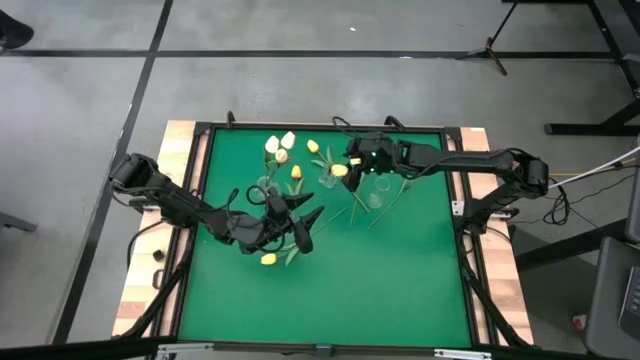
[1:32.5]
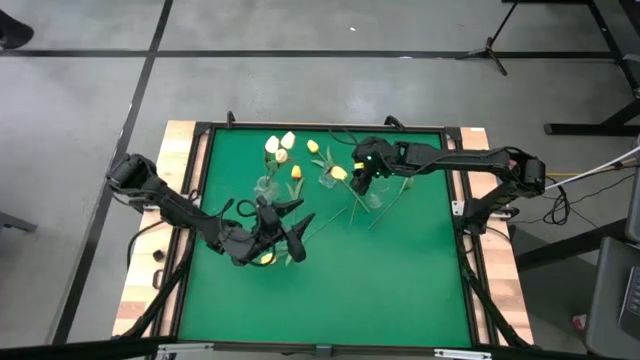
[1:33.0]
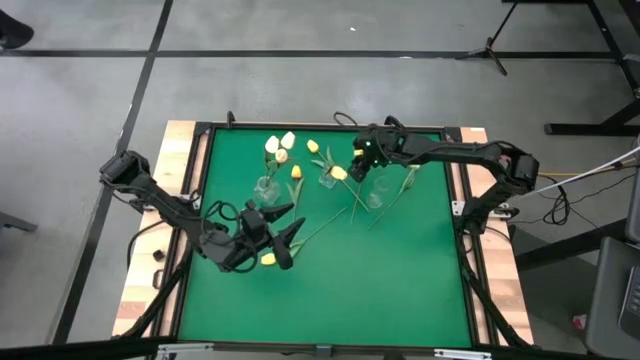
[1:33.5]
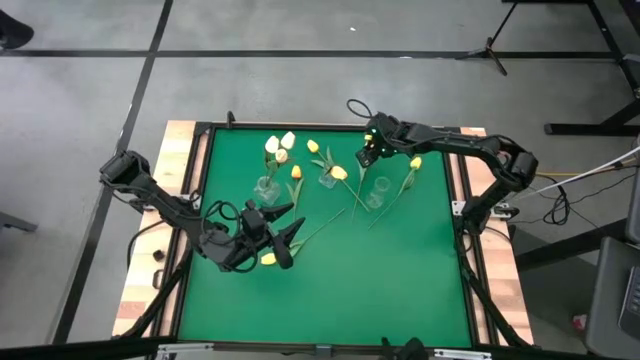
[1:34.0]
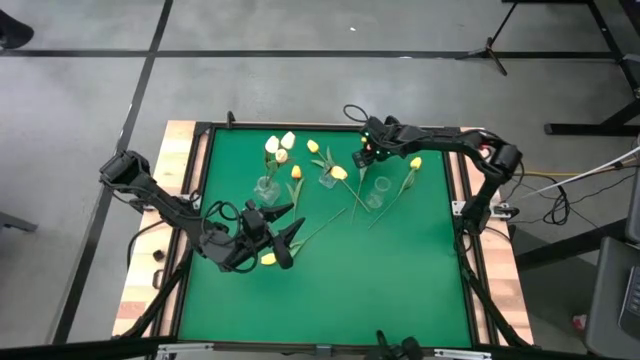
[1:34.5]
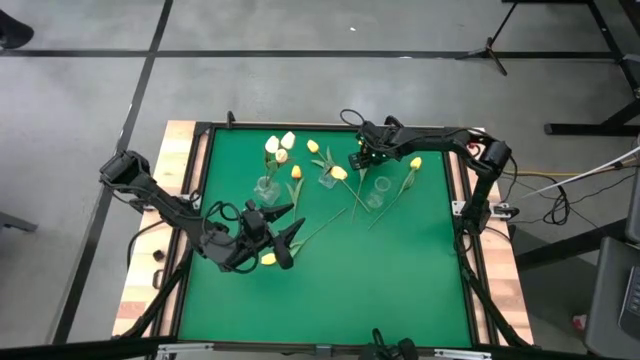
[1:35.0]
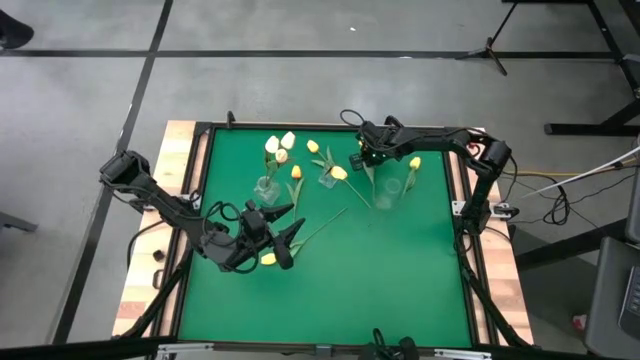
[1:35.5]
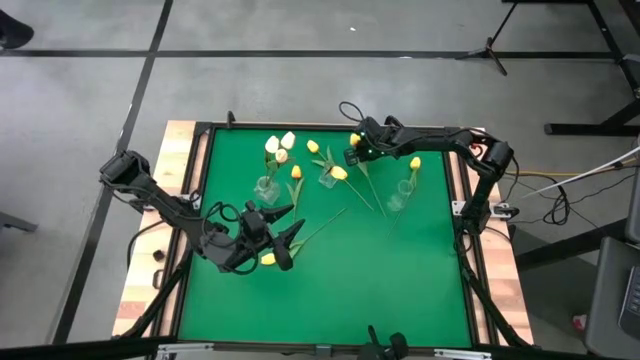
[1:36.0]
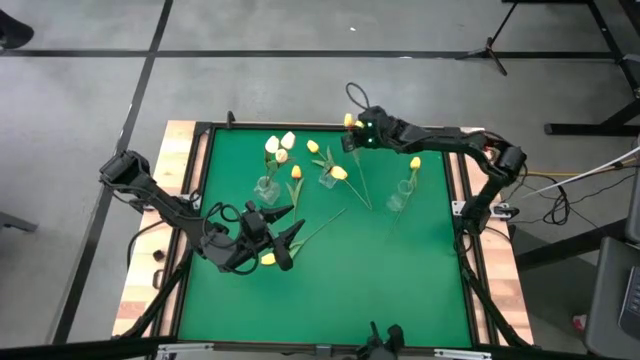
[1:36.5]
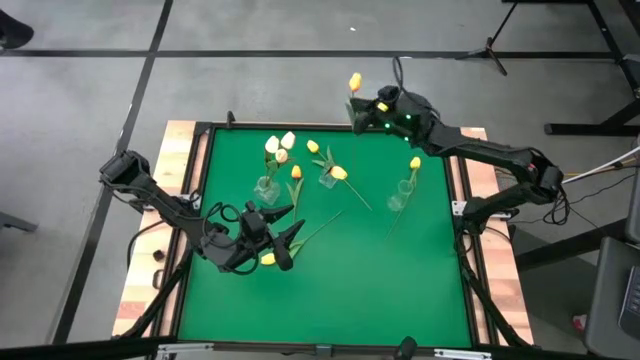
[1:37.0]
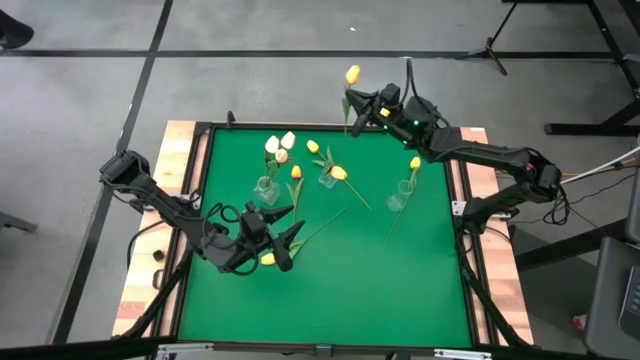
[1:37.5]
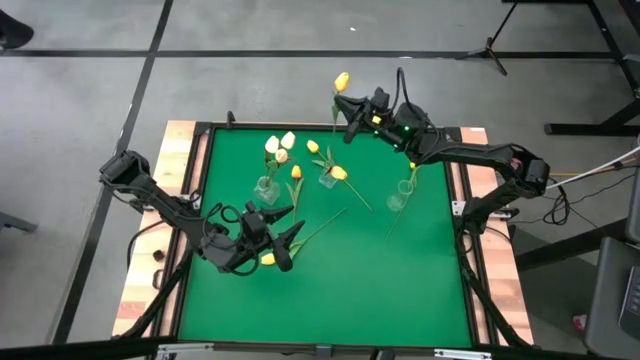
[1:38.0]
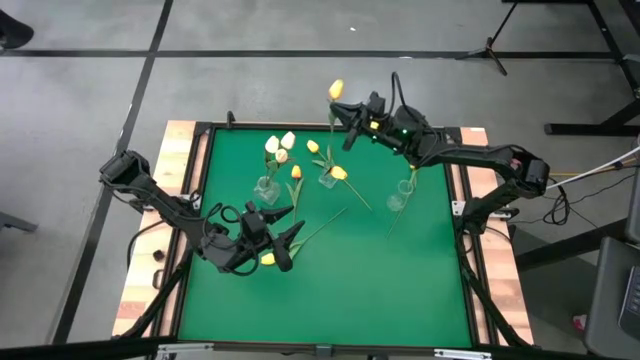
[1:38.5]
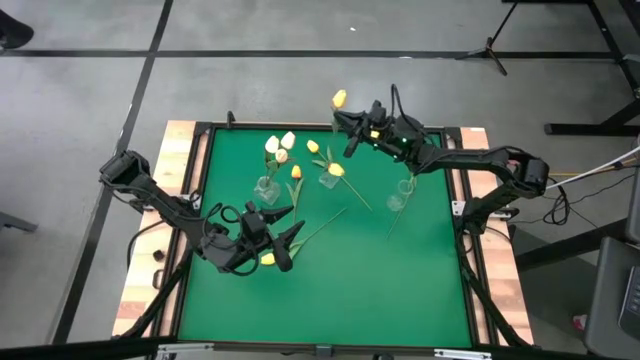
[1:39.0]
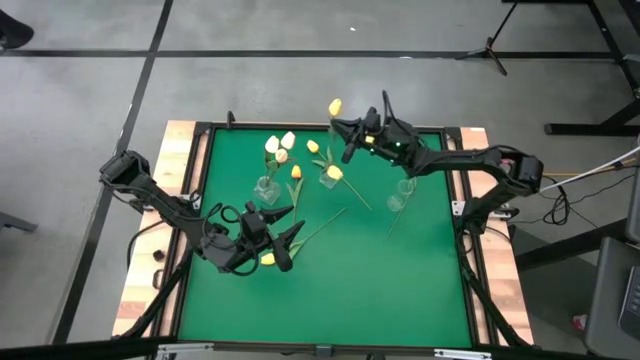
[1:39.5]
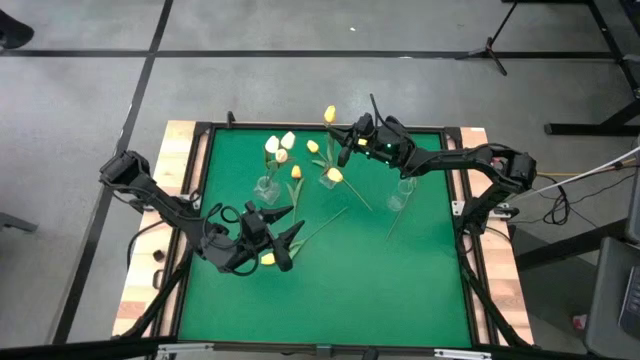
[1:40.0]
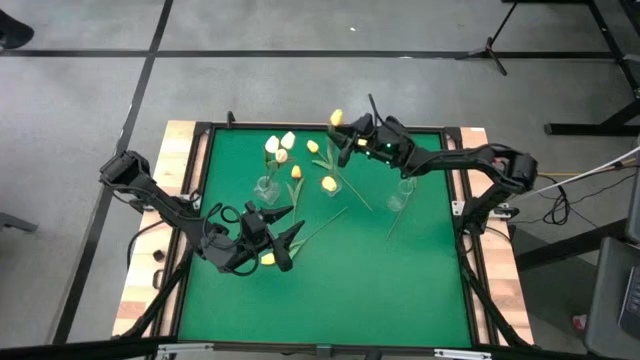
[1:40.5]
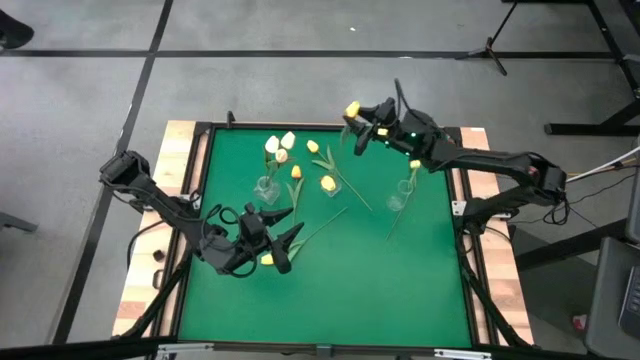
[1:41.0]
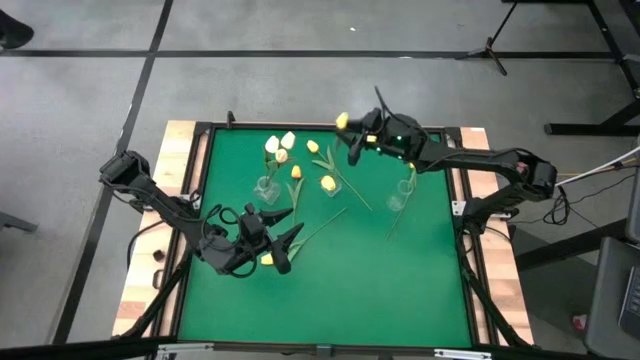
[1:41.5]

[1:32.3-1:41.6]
Task: Sort flowers into vase by color
Put the right yellow with orange flower into the center transparent vase

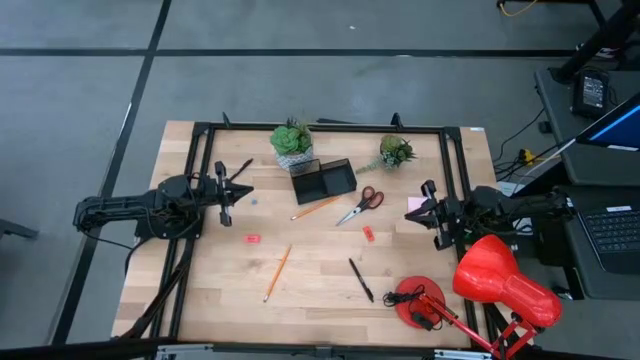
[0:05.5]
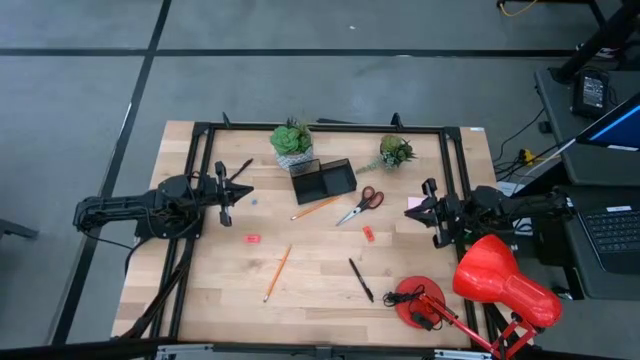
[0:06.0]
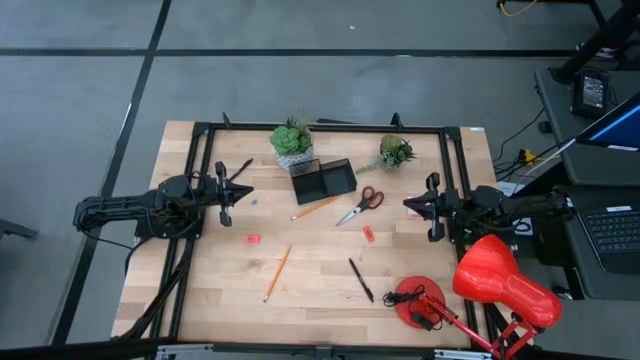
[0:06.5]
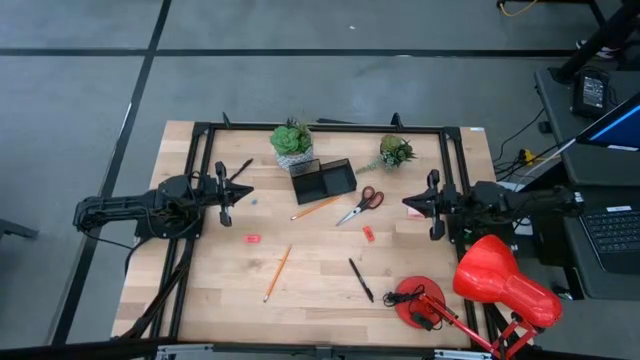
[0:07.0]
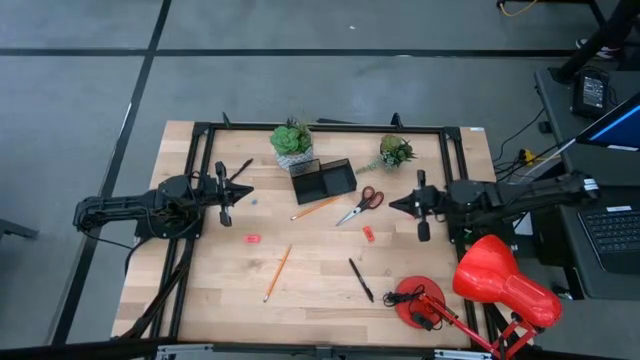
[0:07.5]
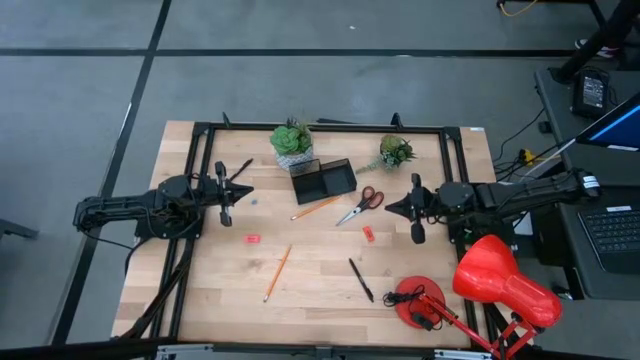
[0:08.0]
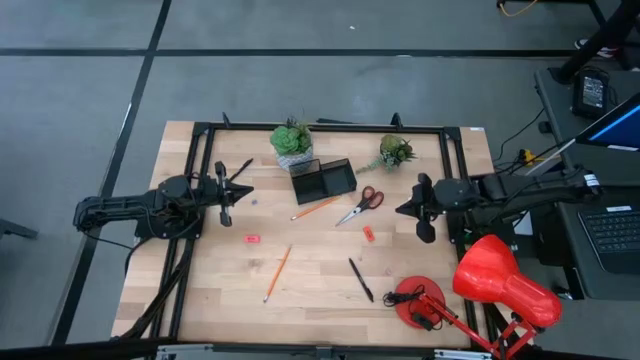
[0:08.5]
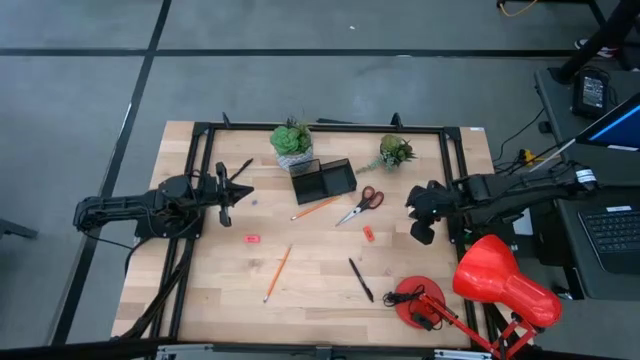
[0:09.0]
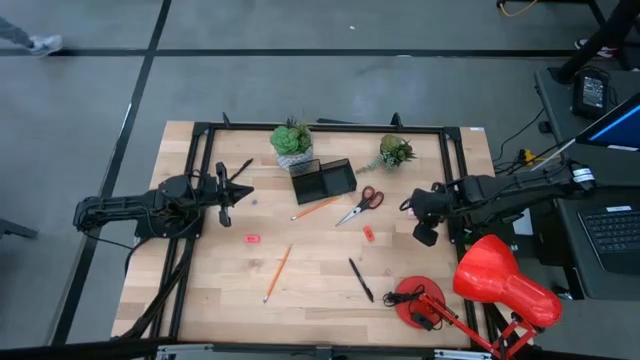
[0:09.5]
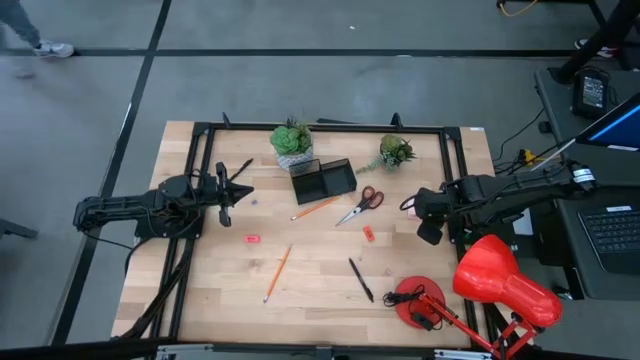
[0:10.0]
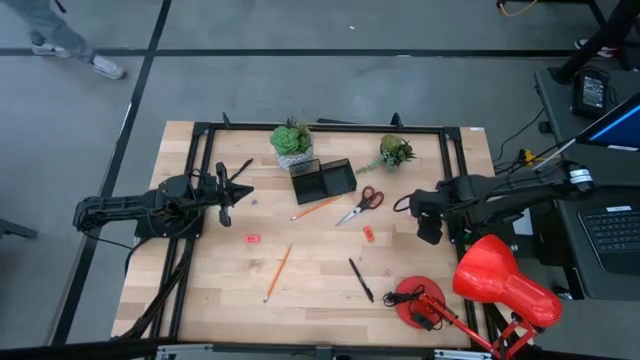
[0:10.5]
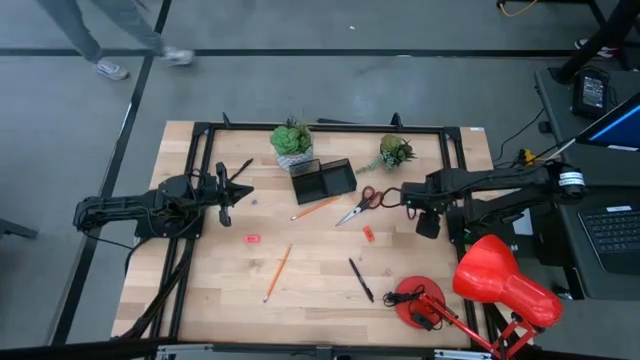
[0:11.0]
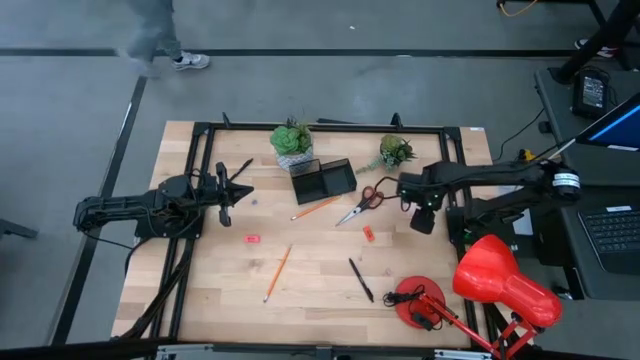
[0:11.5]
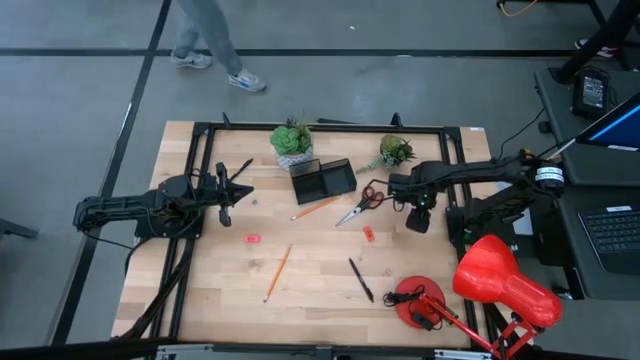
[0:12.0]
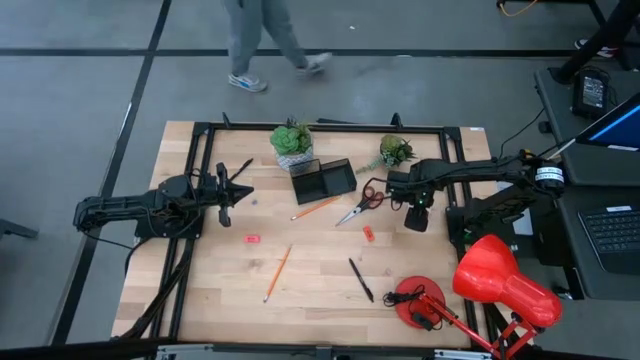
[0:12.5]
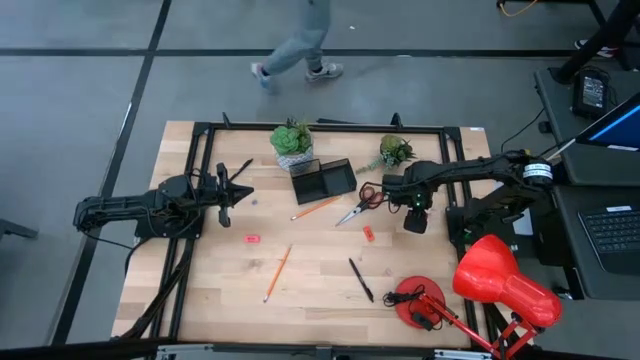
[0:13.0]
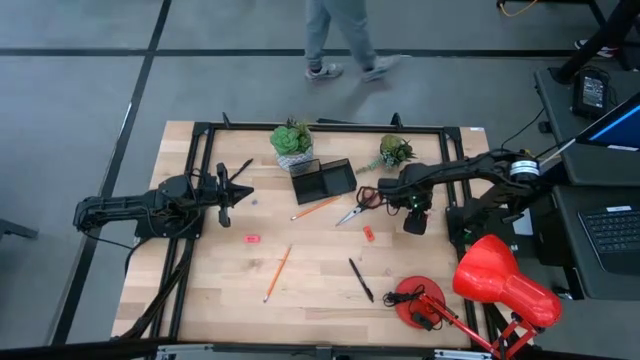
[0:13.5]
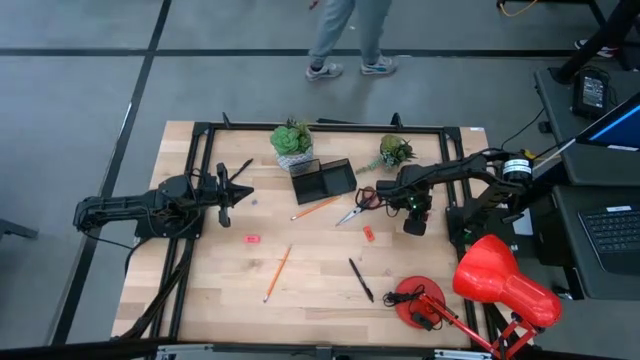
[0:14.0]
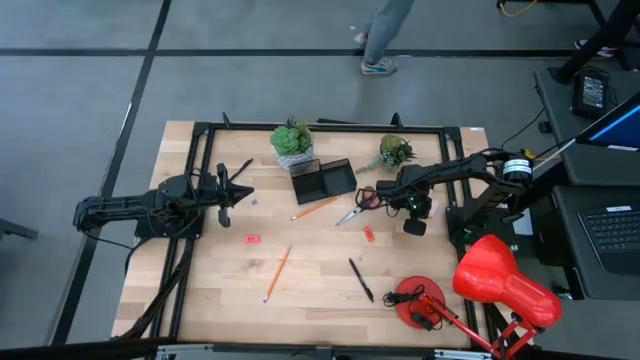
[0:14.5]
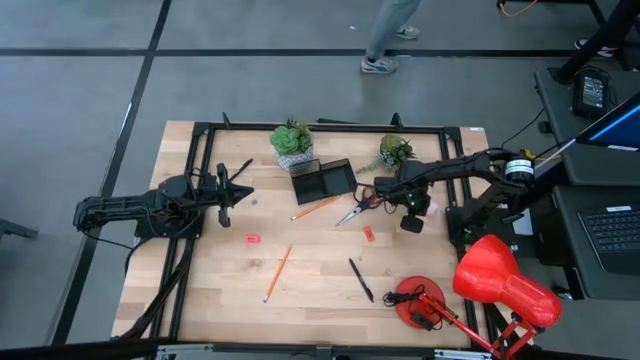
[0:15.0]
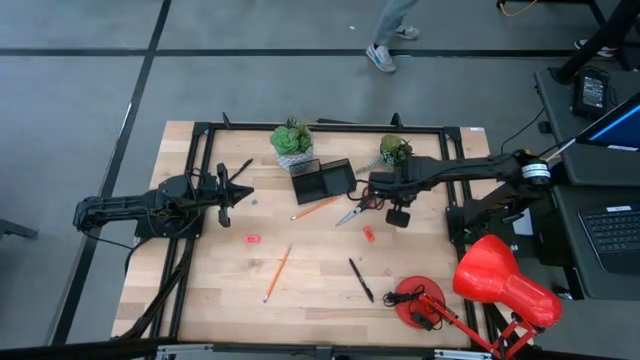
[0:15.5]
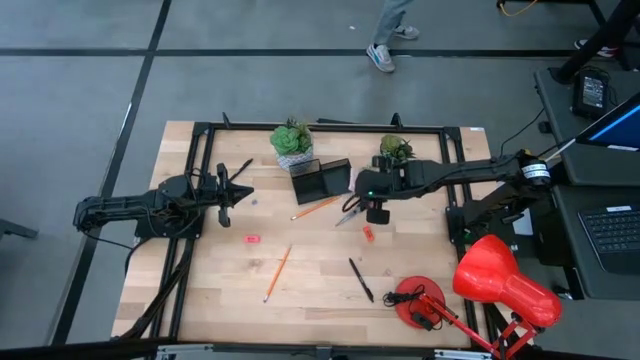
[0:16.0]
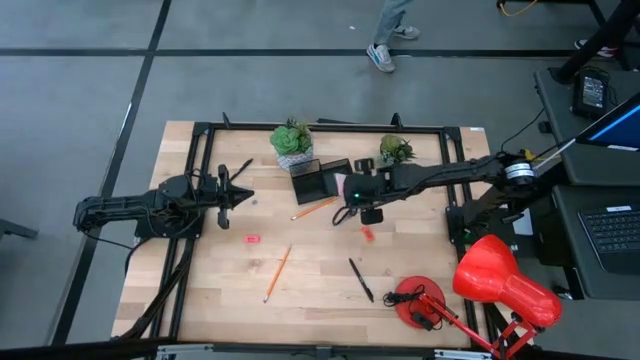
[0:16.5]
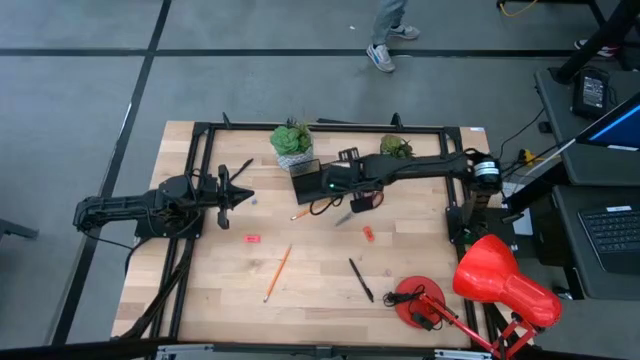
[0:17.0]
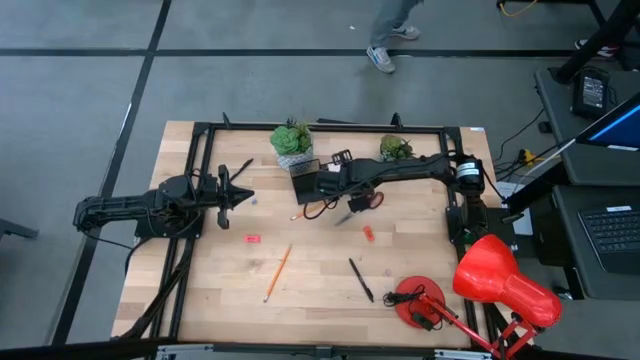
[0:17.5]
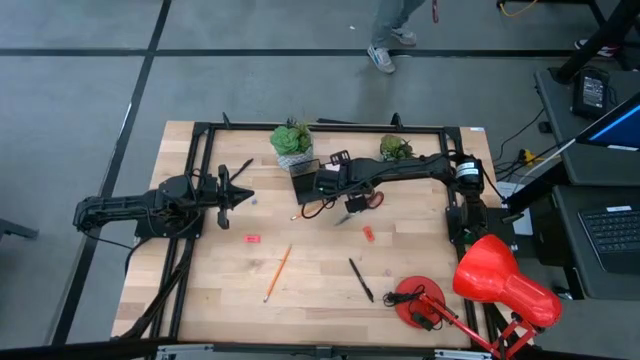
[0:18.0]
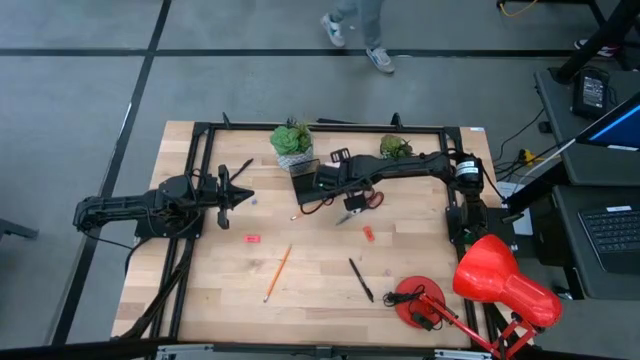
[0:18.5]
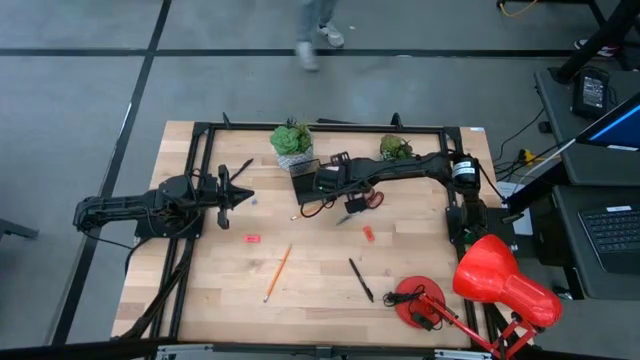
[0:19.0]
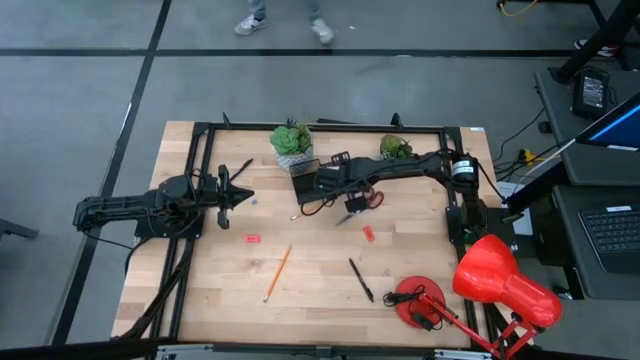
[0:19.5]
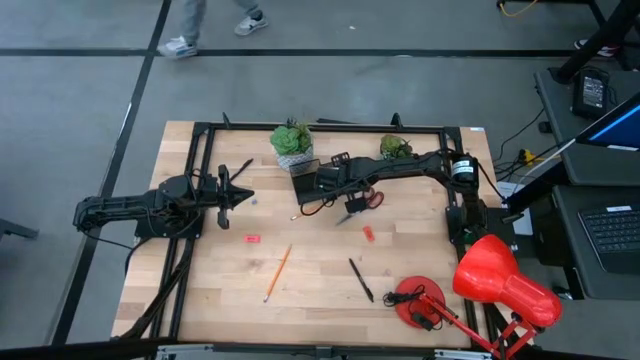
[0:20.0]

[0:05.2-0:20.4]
Task: Pick and place office supplies into organizer
Put the pink sticky notes into the black desk organizer
